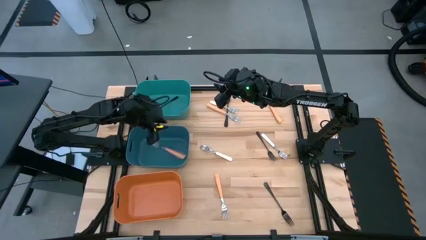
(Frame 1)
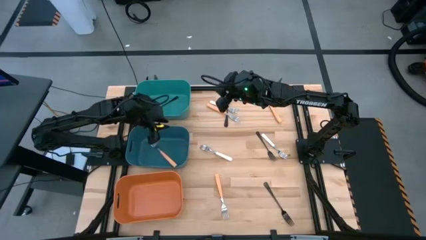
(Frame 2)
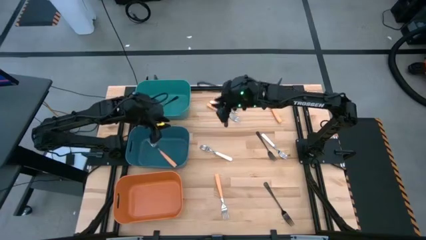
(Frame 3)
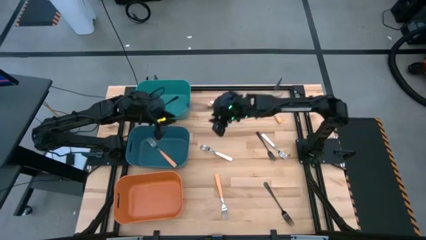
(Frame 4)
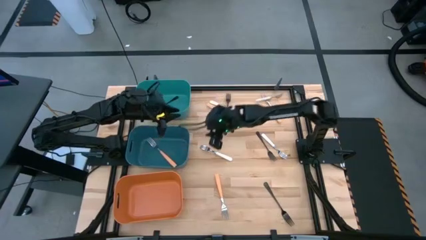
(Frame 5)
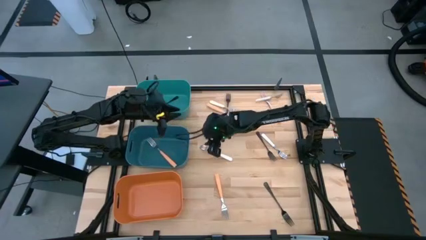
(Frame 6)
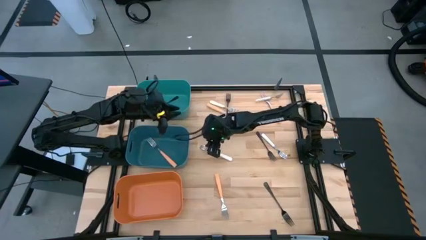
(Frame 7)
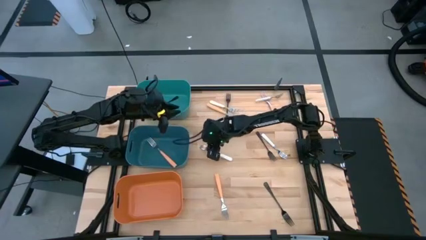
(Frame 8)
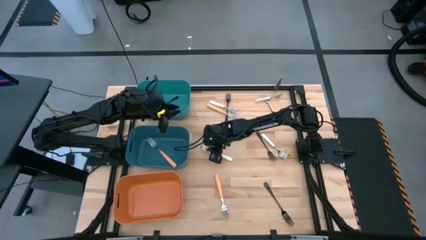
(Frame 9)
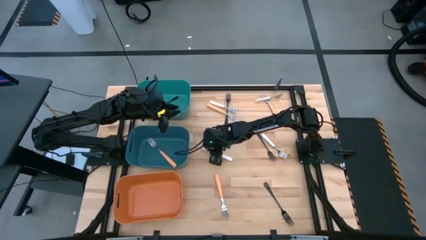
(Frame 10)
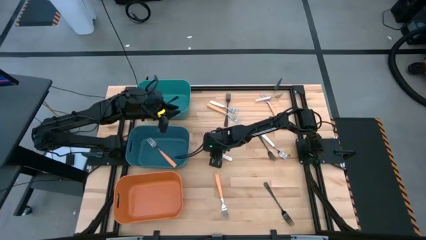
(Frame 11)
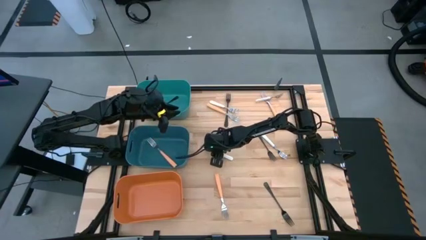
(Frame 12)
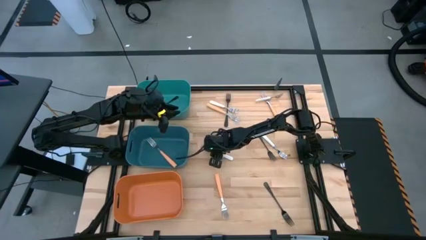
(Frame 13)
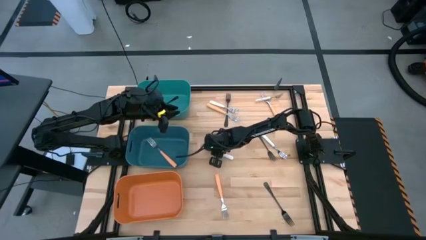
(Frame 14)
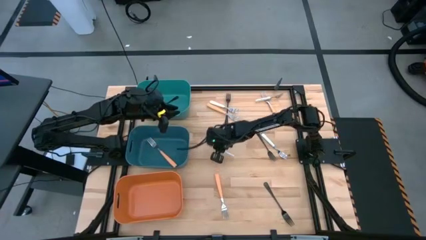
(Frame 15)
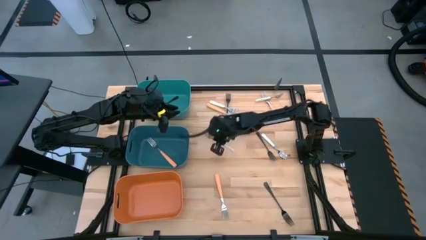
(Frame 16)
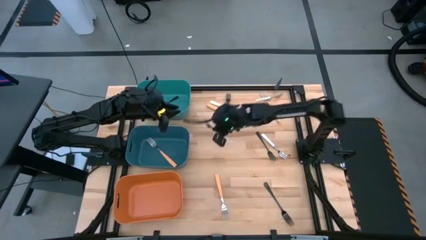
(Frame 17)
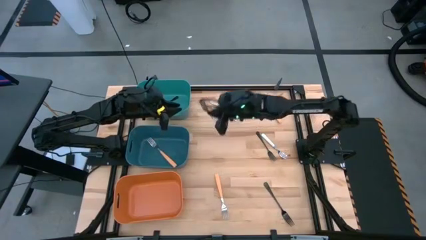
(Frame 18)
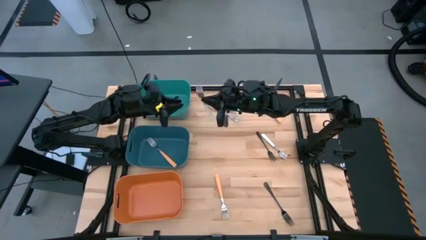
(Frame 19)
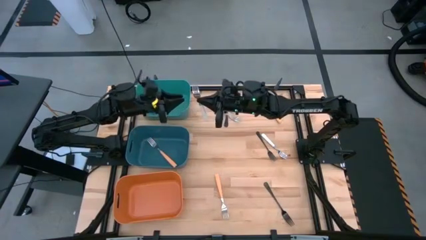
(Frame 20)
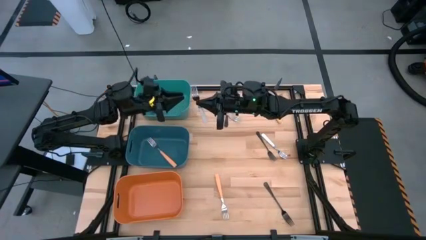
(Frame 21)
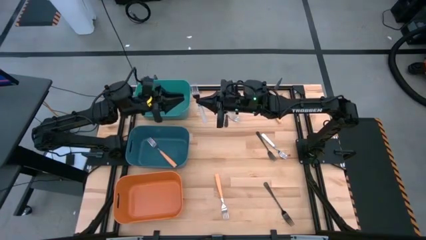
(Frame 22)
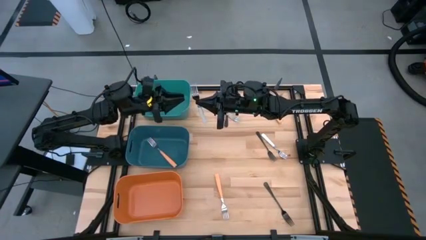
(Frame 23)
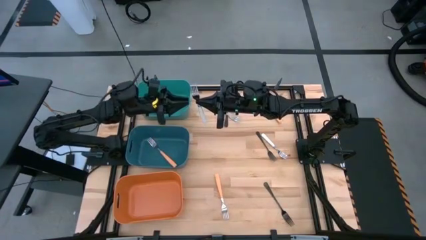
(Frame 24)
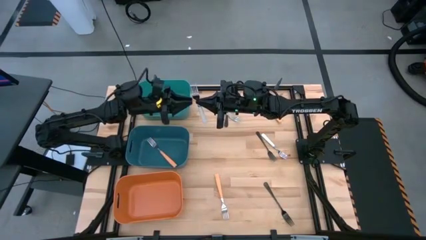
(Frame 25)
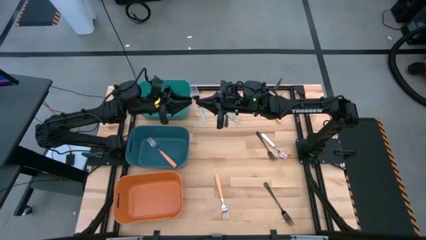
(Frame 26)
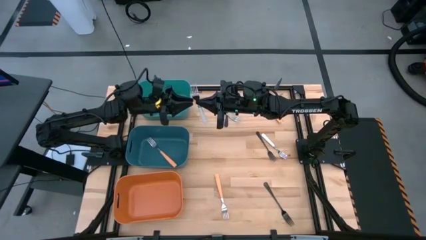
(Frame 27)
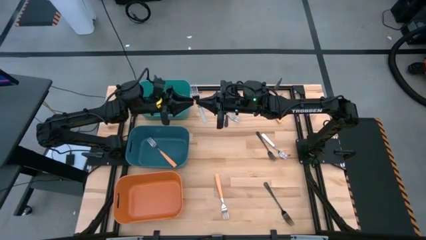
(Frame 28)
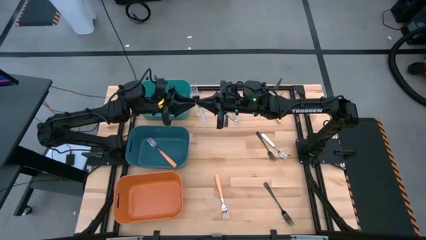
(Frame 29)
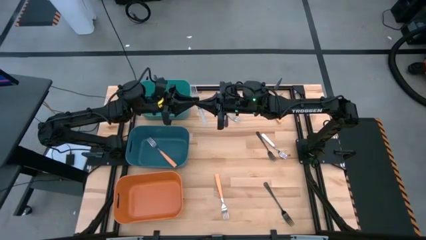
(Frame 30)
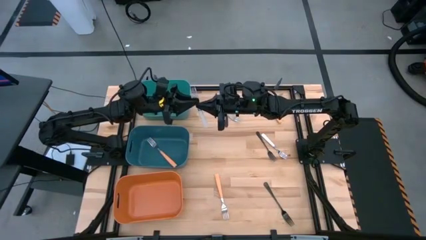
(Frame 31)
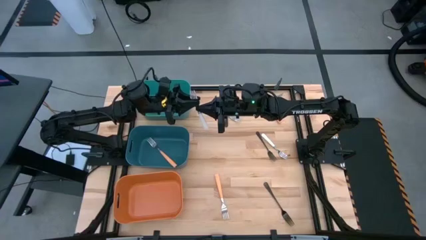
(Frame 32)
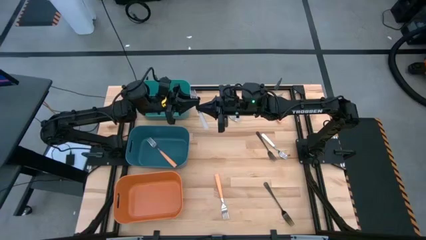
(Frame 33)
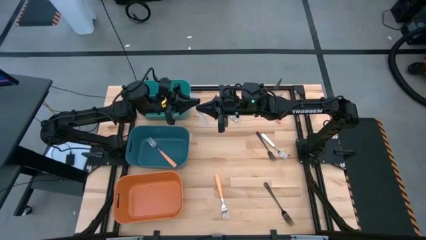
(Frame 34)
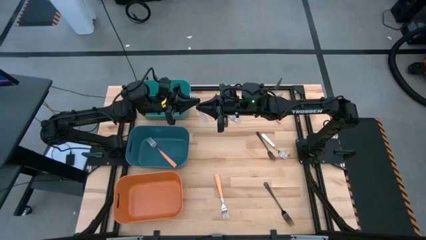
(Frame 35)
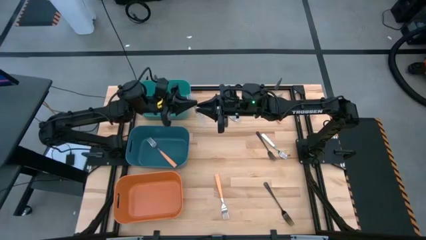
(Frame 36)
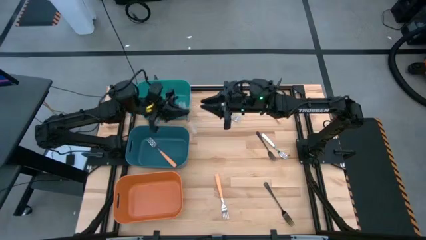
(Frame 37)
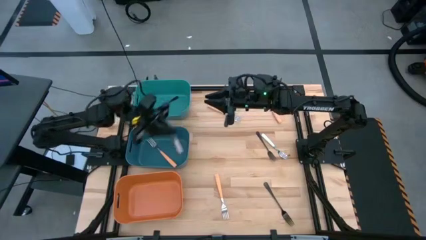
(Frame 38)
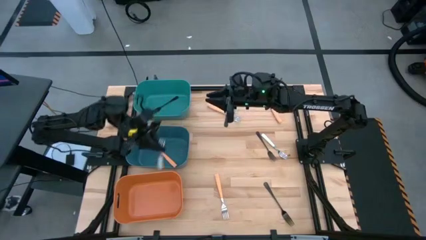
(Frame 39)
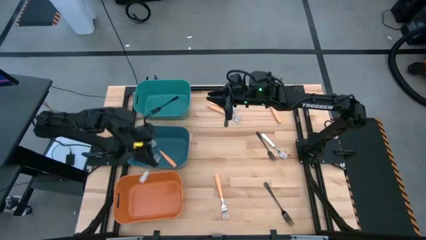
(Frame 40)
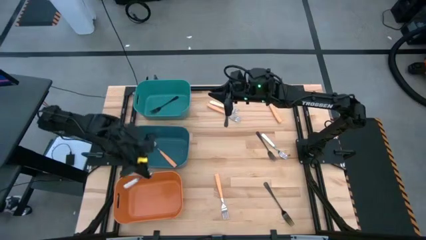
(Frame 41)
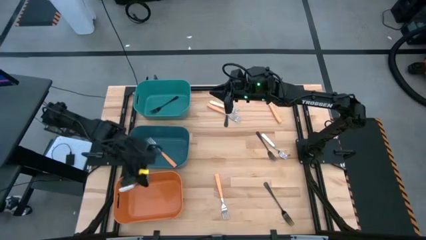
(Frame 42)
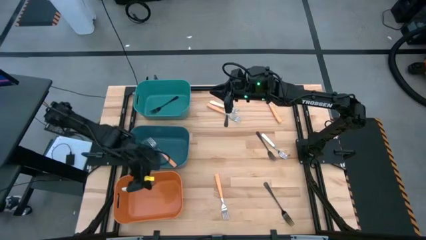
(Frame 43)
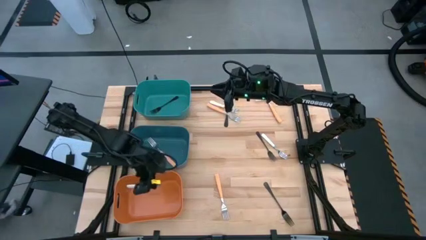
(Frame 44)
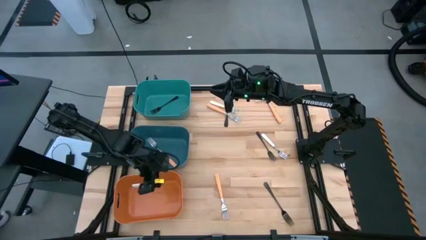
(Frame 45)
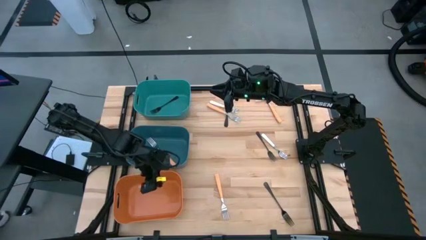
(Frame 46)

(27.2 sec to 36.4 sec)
Task: Sort silverware by color (type)
Put the white fork into the orange bin
